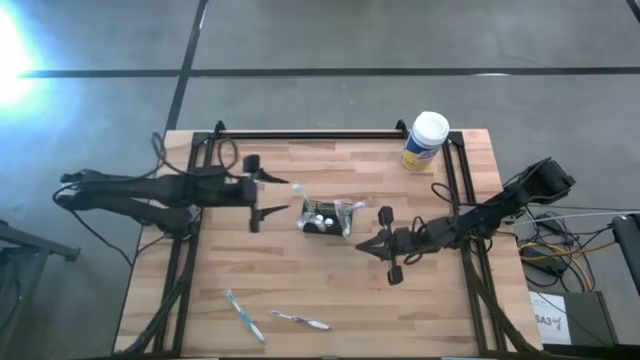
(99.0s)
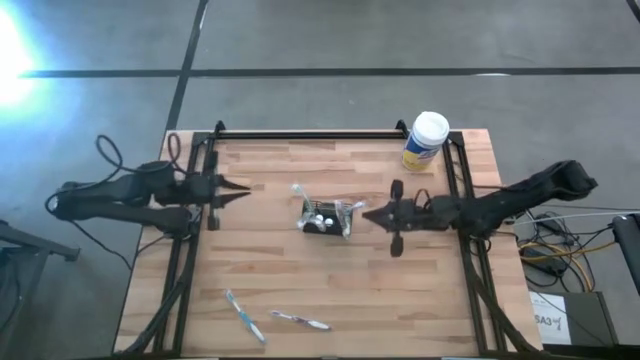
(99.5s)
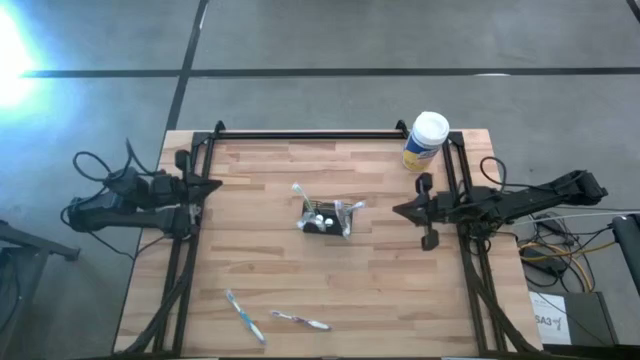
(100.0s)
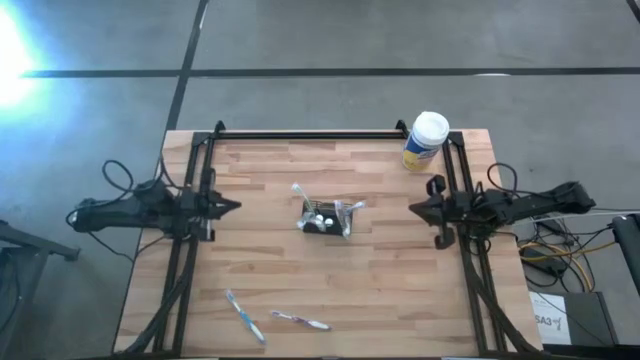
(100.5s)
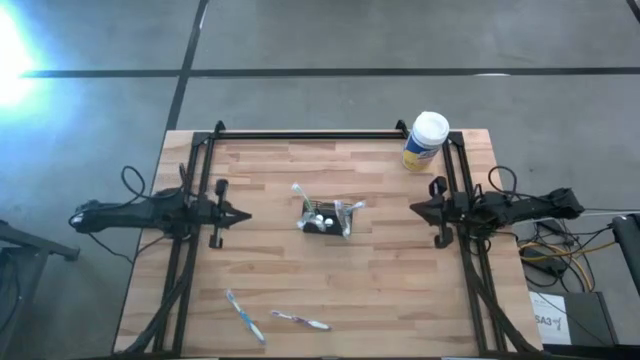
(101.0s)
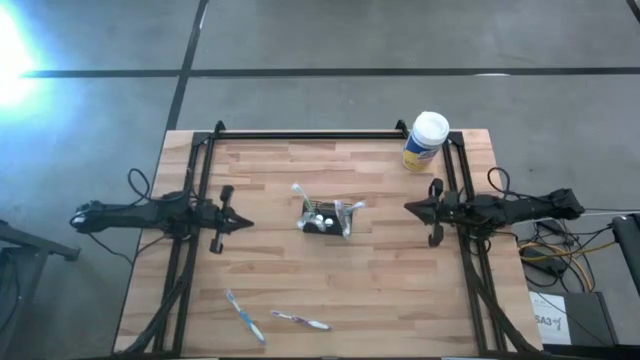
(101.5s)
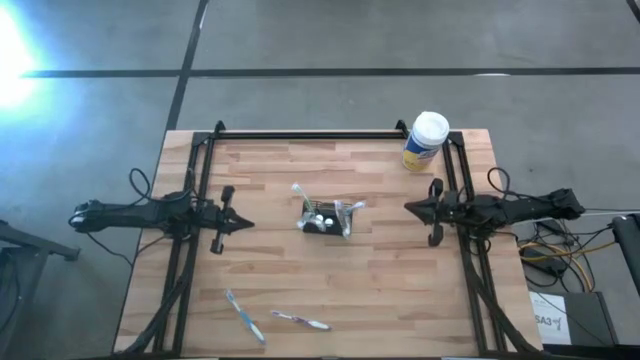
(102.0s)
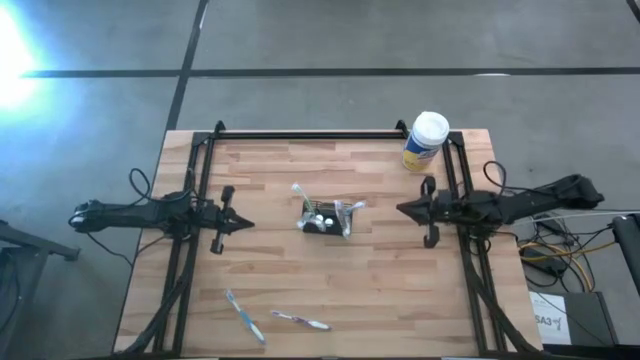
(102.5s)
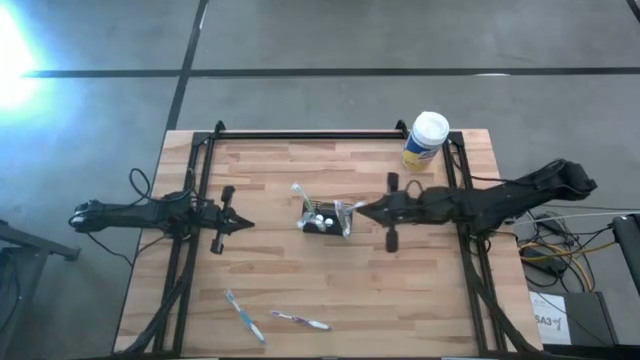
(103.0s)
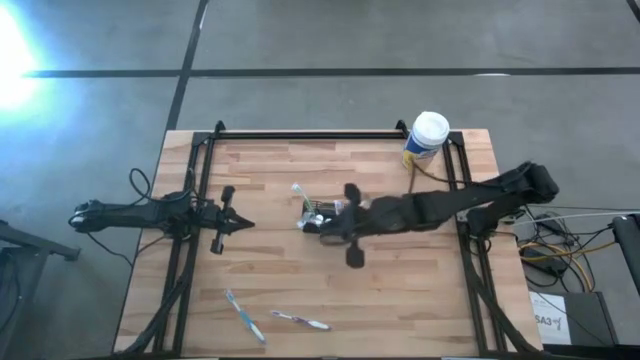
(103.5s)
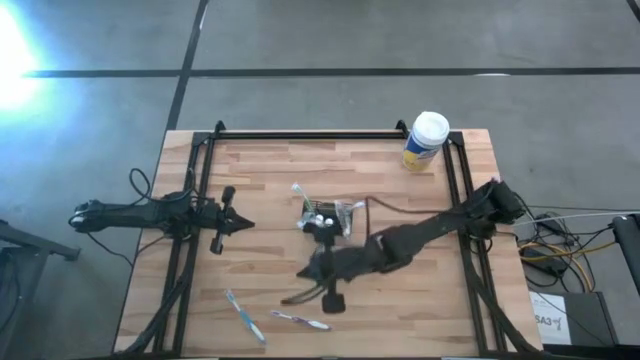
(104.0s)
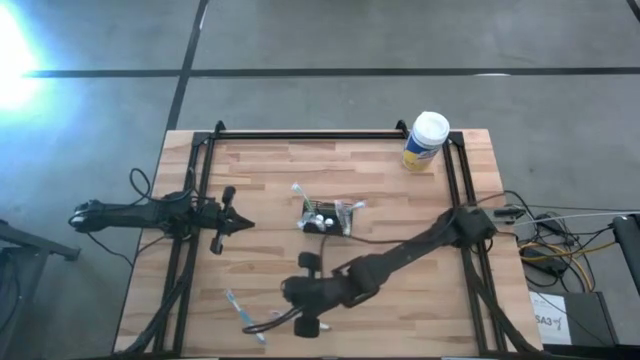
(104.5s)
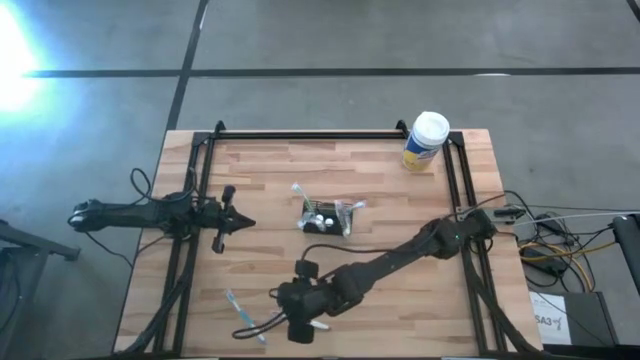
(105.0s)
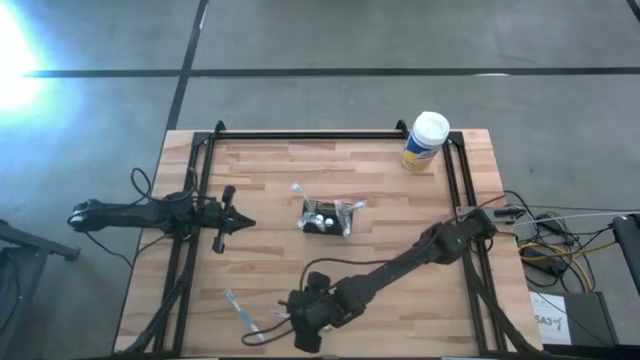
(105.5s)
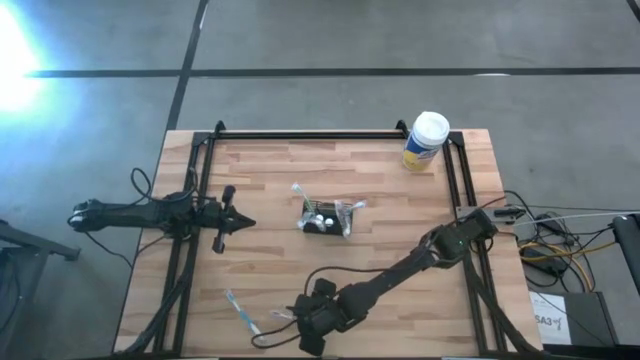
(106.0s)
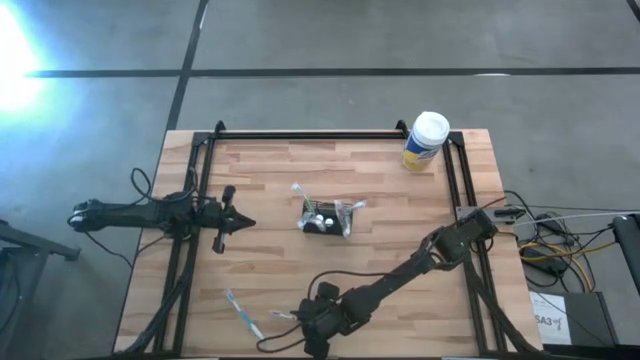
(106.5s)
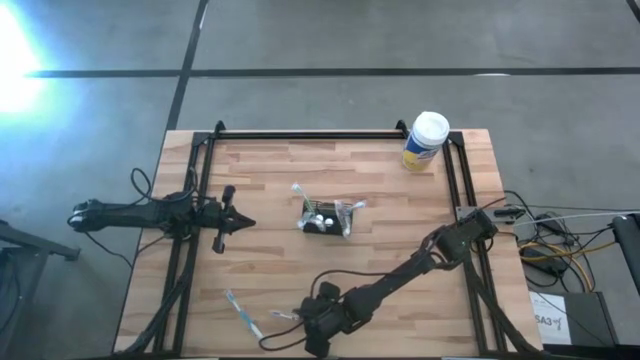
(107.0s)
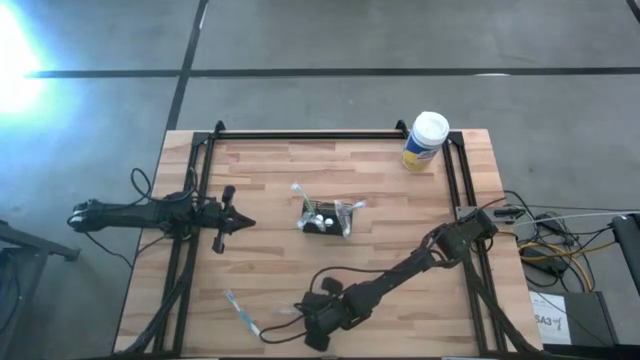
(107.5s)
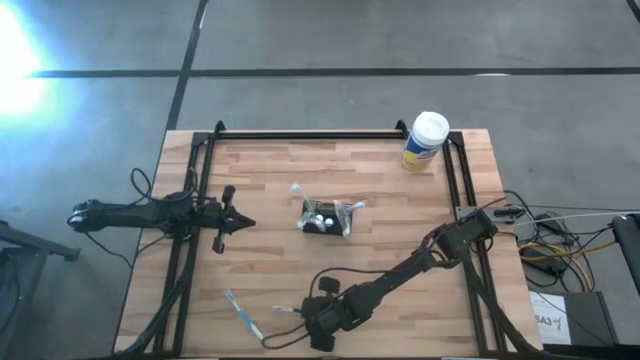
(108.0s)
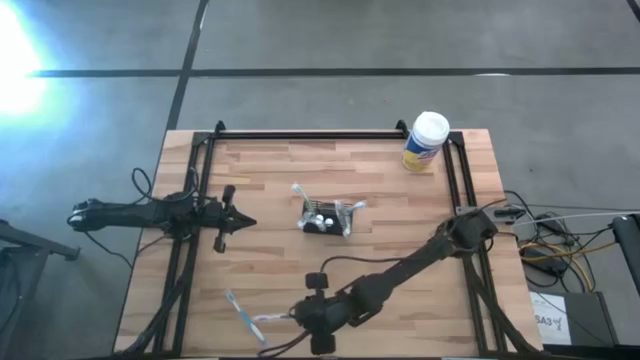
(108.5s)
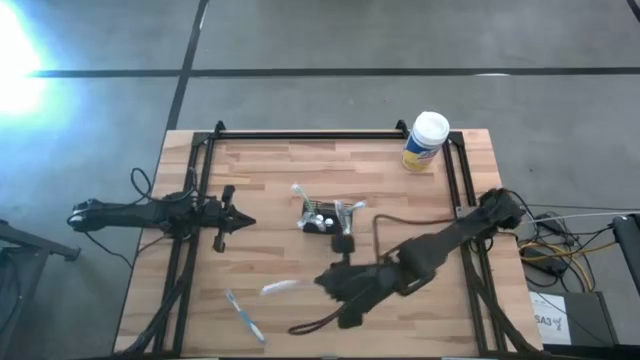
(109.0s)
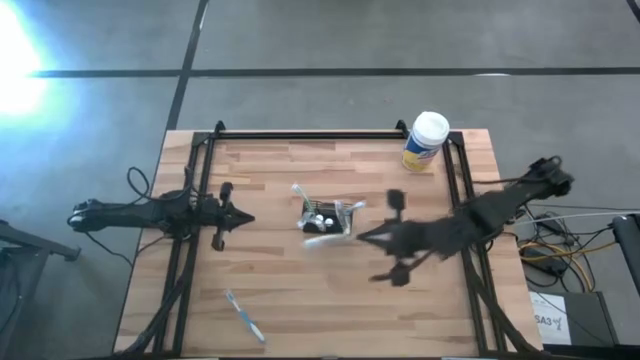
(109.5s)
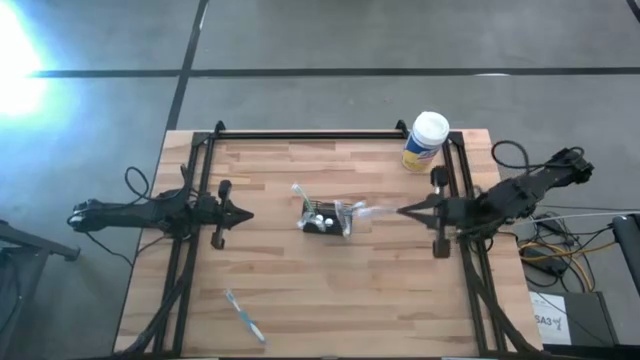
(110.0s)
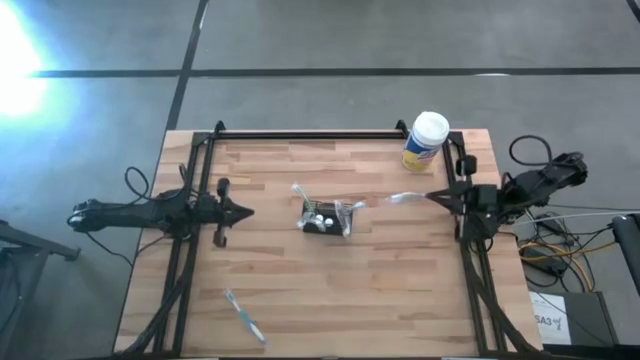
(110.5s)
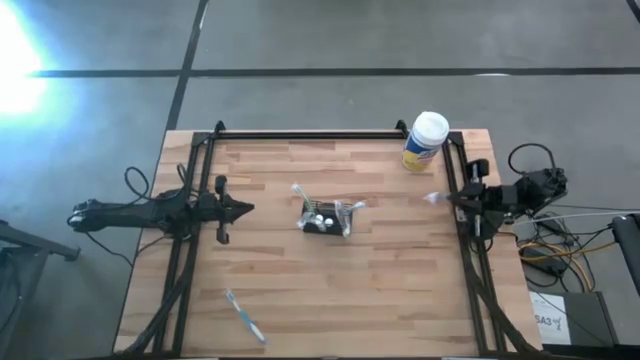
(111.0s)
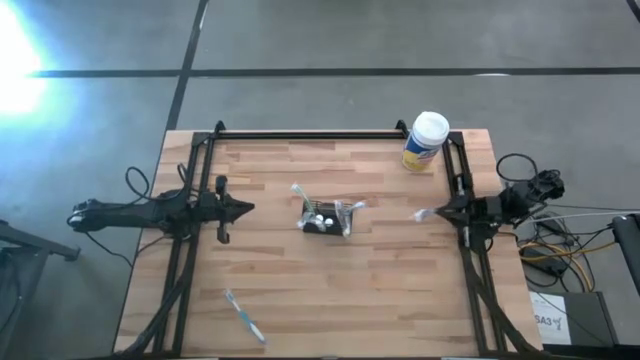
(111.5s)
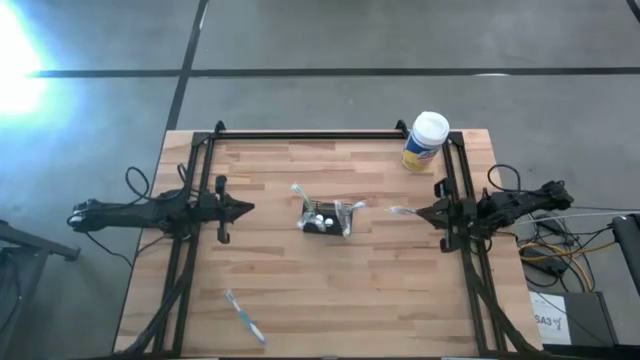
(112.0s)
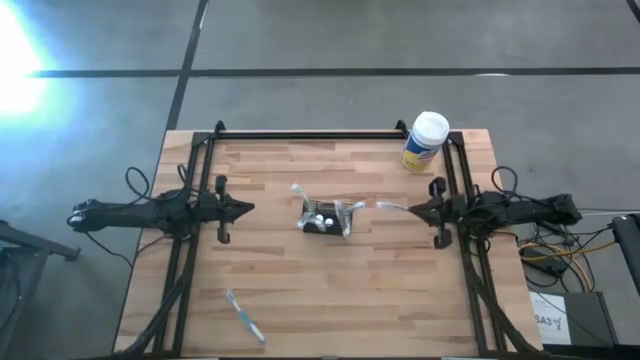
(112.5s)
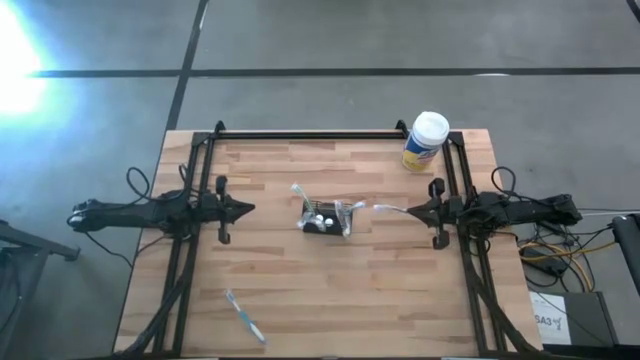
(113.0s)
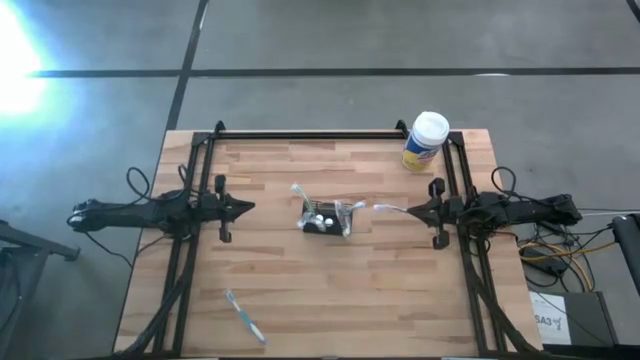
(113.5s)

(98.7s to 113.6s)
Task: Pick & Place toothbrushing station
Put the violet toothbrush into the black mesh organizer

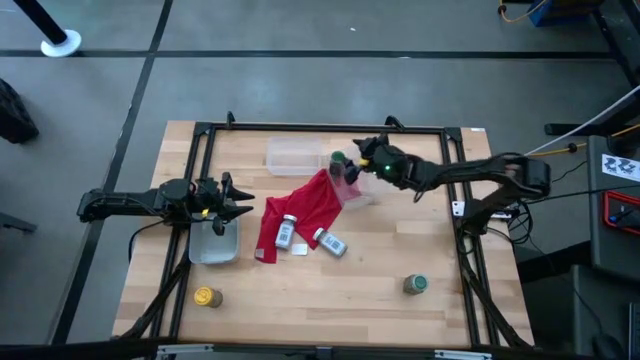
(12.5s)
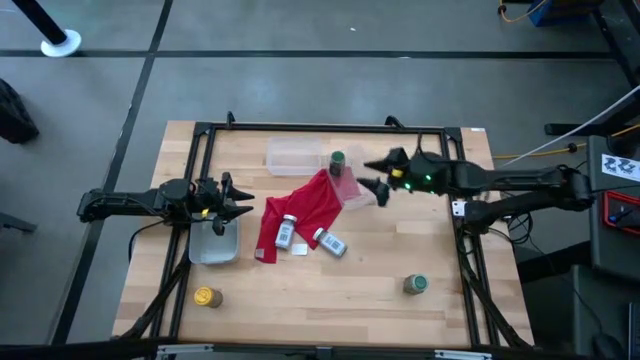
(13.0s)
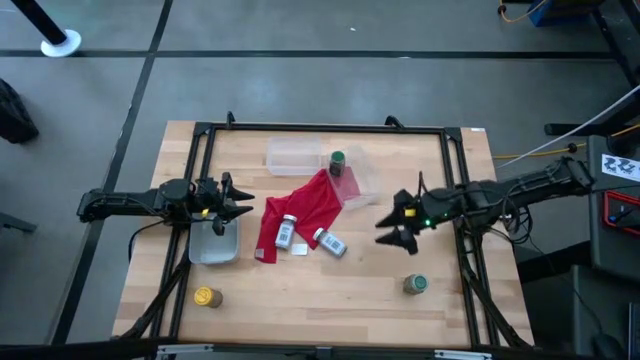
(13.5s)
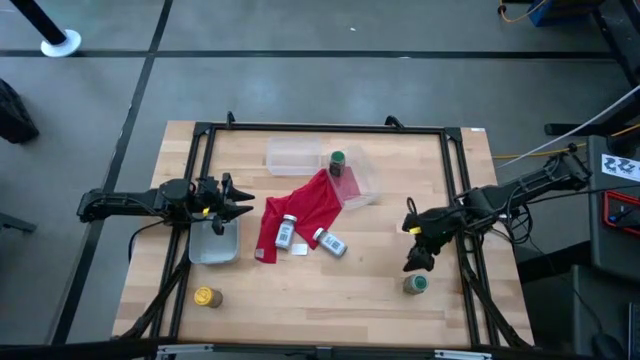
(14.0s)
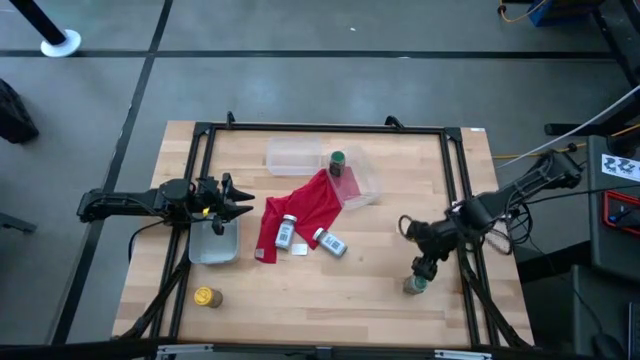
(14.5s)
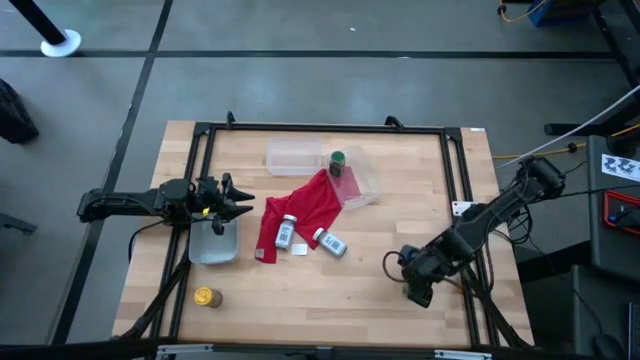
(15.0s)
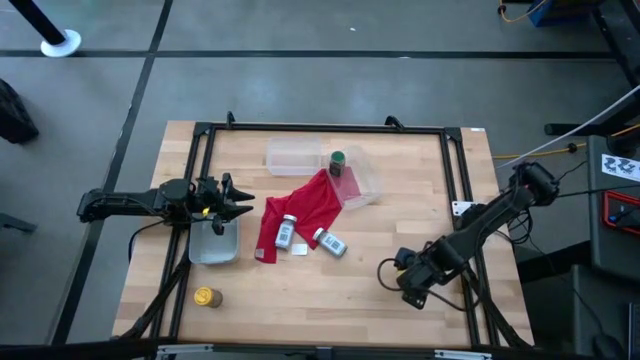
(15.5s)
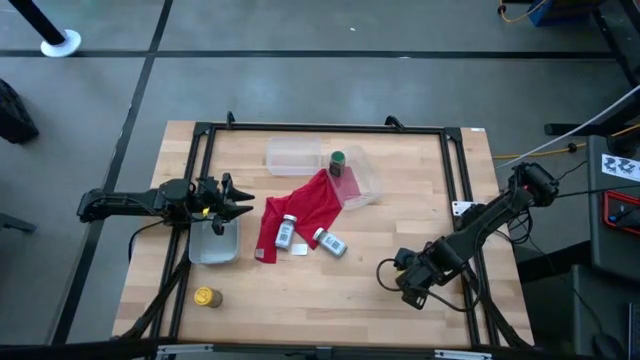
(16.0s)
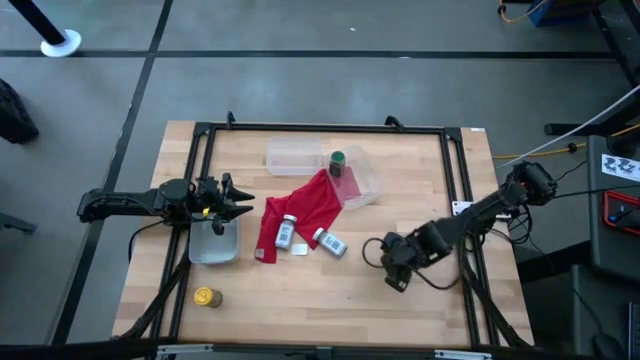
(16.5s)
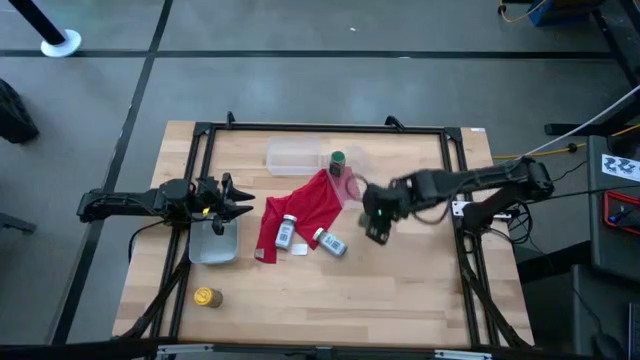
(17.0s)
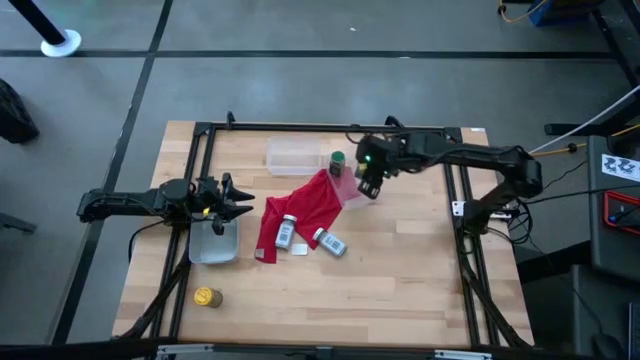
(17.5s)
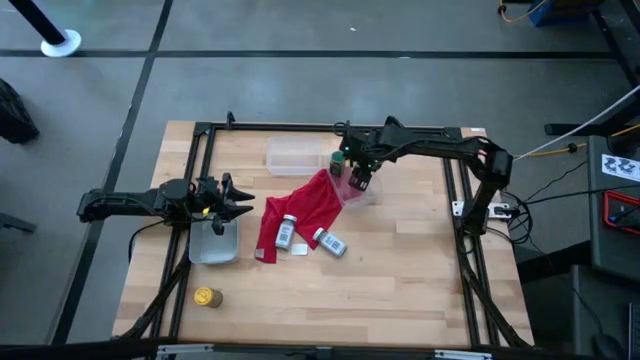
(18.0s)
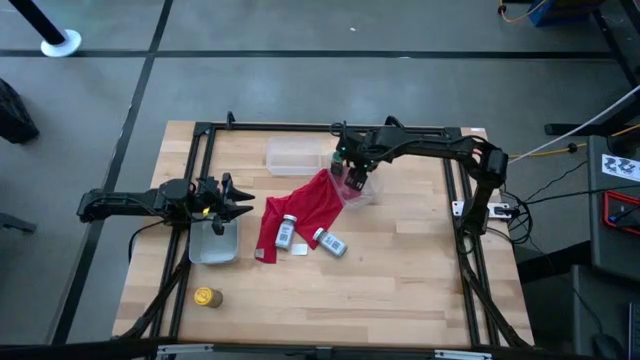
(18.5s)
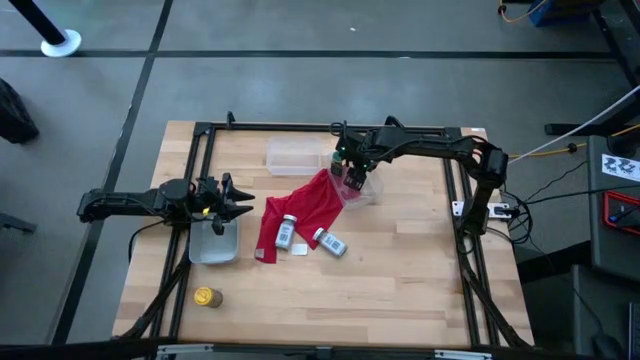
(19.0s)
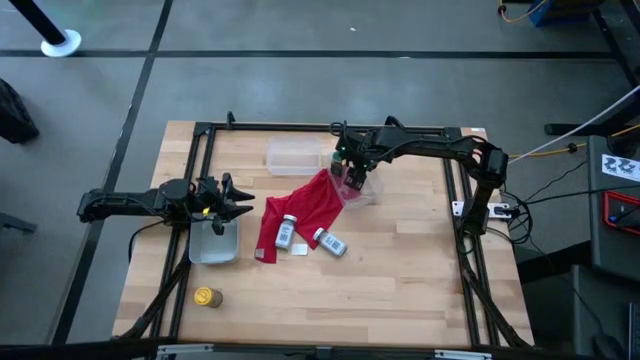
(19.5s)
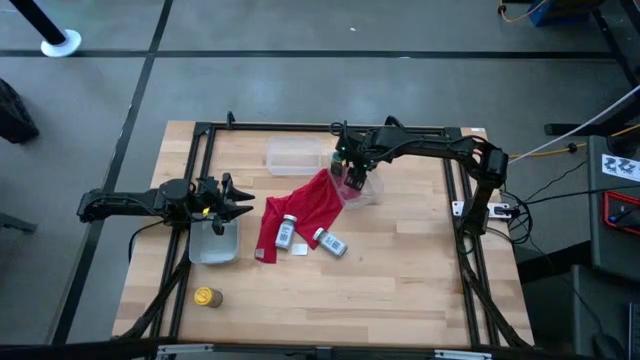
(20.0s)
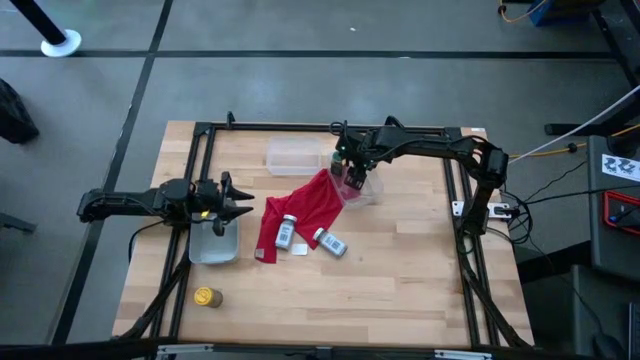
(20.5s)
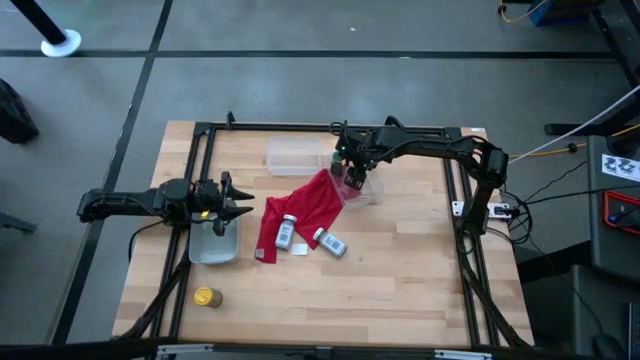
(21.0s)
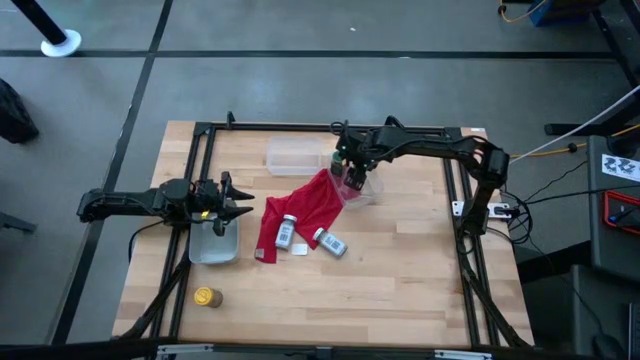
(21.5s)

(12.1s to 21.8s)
Task: Sort spices by type
Put the green seasoning bottle into the right transparent bin
